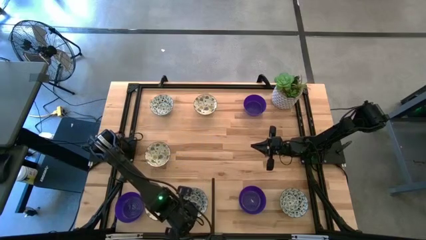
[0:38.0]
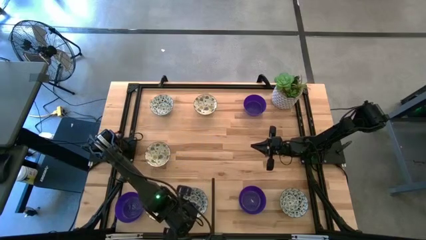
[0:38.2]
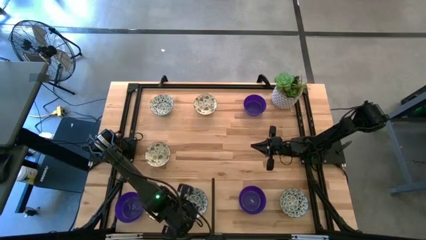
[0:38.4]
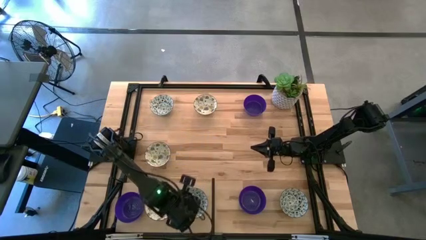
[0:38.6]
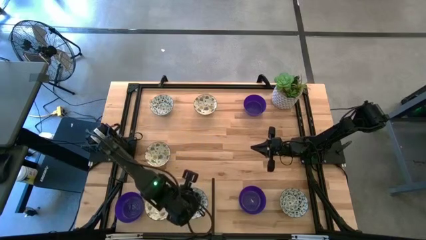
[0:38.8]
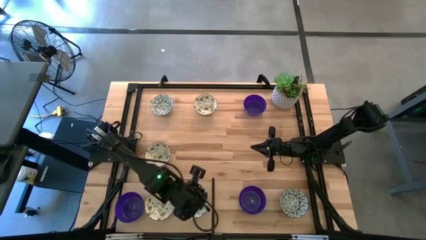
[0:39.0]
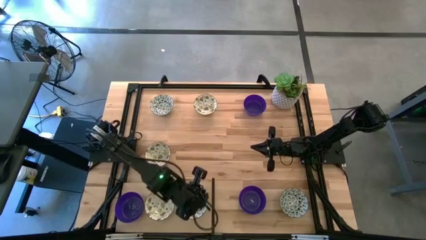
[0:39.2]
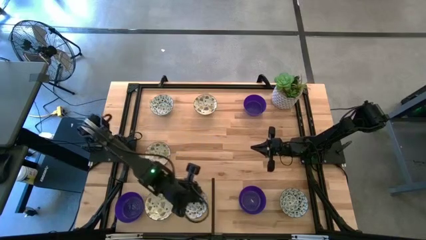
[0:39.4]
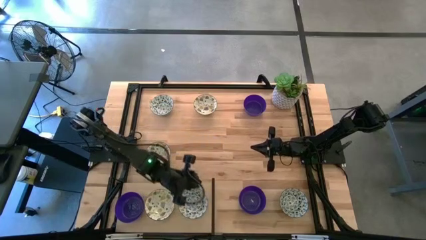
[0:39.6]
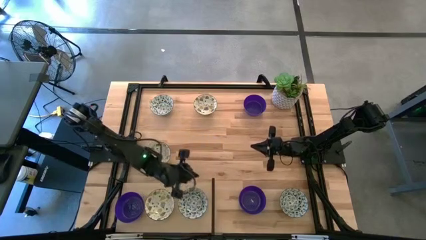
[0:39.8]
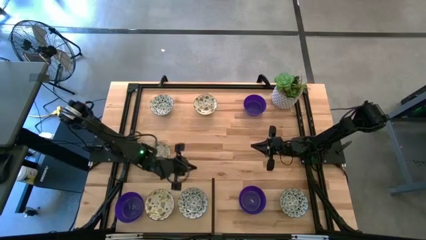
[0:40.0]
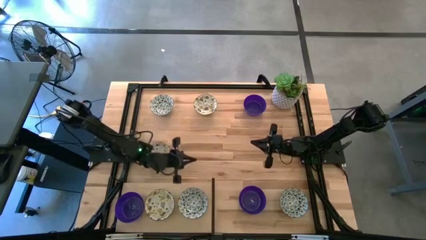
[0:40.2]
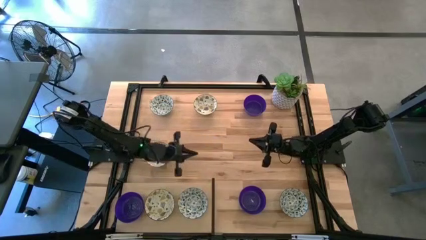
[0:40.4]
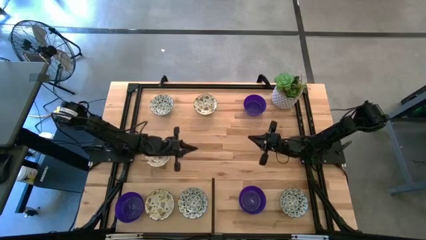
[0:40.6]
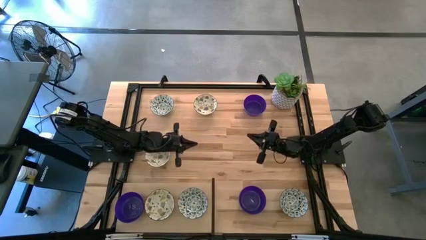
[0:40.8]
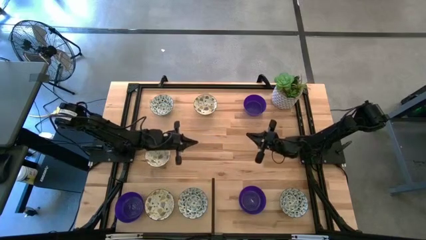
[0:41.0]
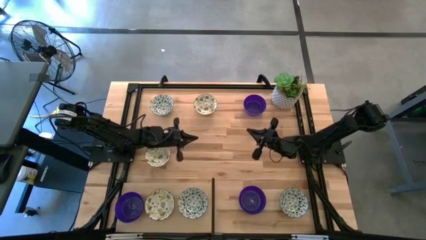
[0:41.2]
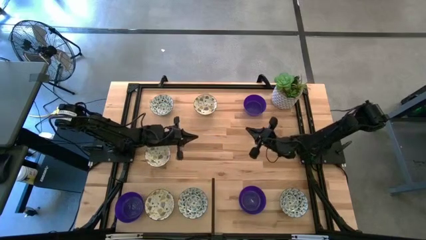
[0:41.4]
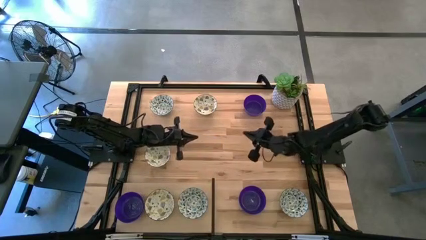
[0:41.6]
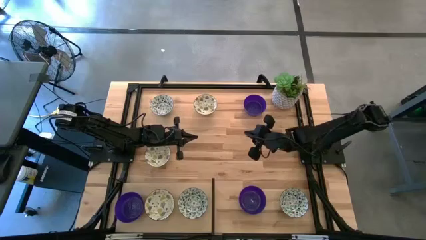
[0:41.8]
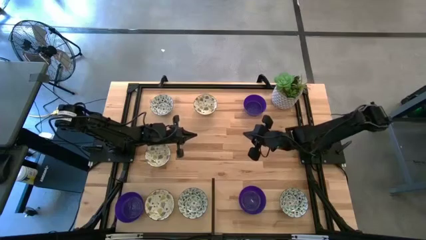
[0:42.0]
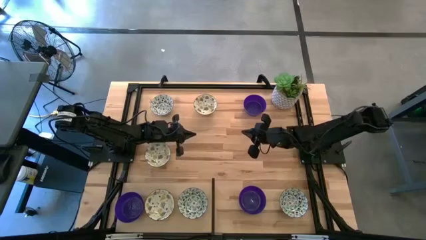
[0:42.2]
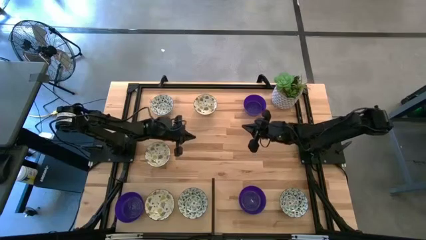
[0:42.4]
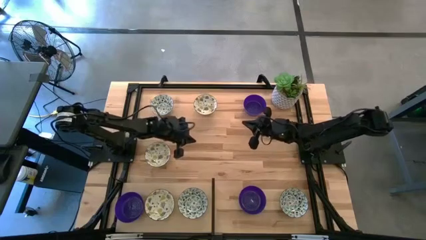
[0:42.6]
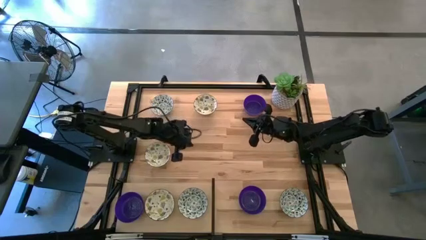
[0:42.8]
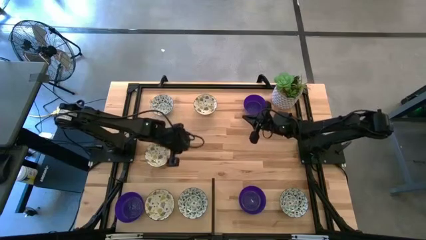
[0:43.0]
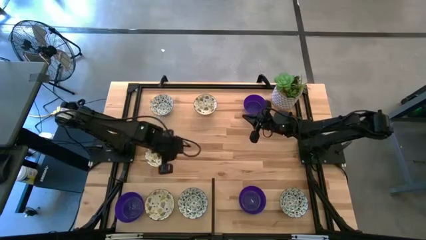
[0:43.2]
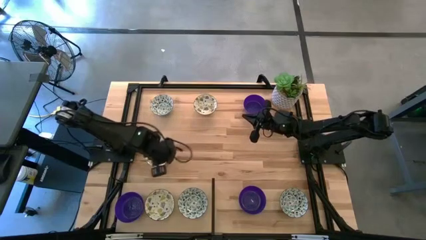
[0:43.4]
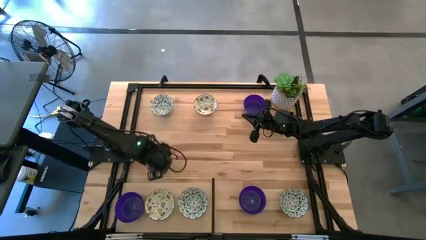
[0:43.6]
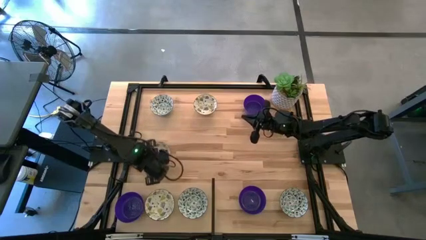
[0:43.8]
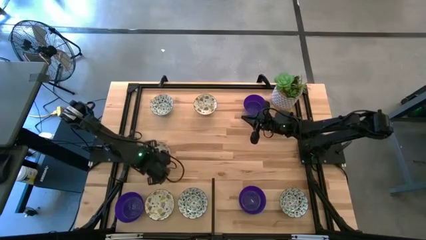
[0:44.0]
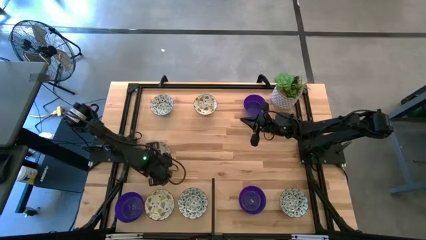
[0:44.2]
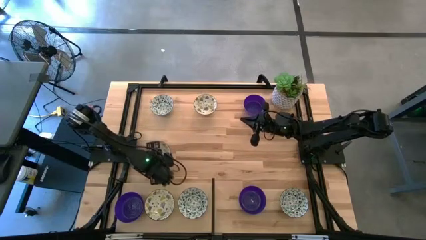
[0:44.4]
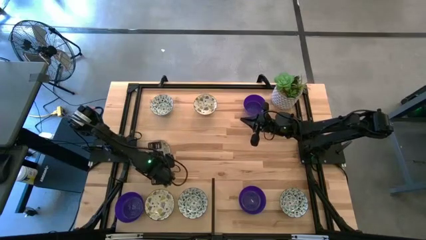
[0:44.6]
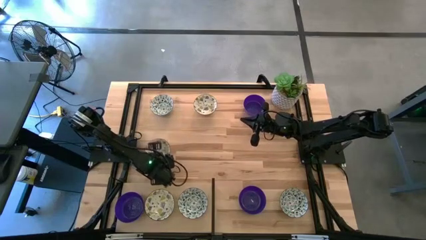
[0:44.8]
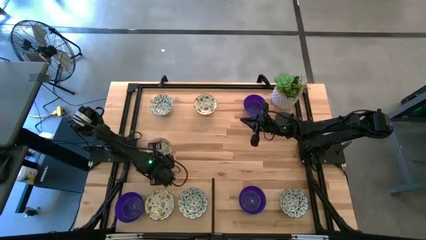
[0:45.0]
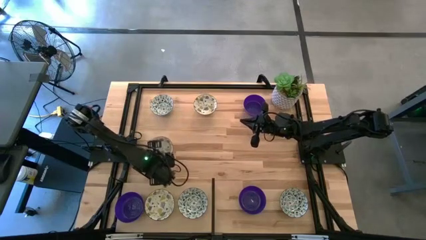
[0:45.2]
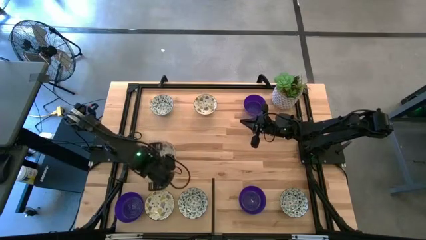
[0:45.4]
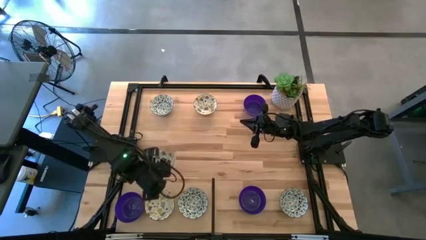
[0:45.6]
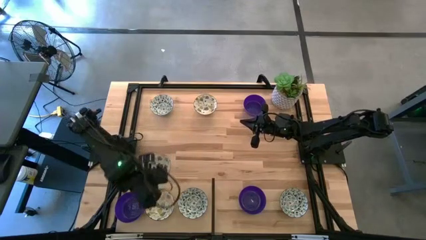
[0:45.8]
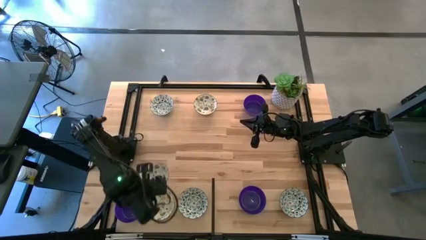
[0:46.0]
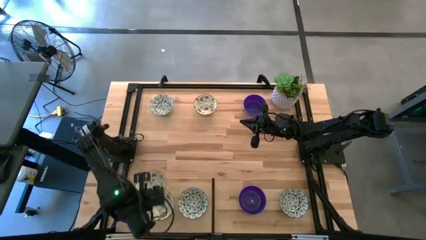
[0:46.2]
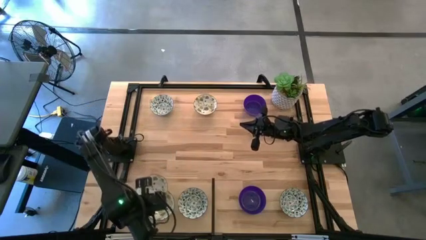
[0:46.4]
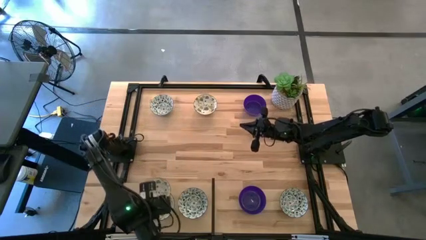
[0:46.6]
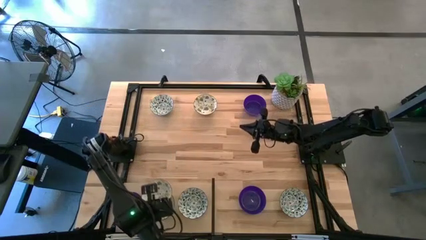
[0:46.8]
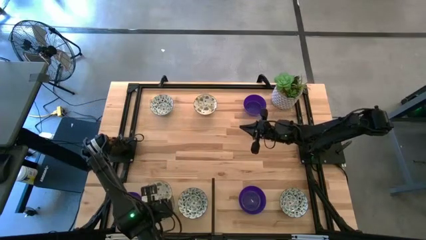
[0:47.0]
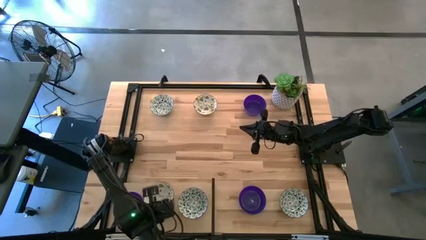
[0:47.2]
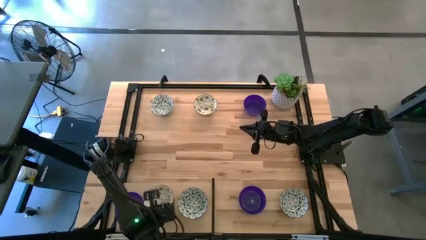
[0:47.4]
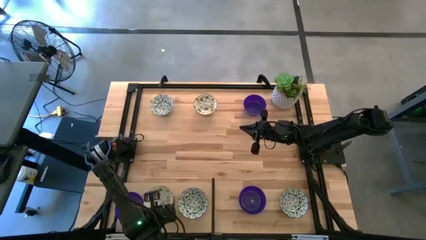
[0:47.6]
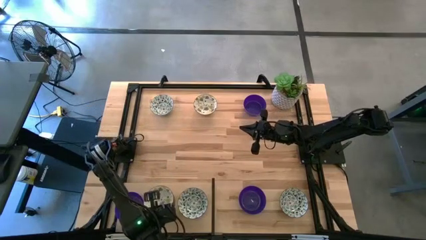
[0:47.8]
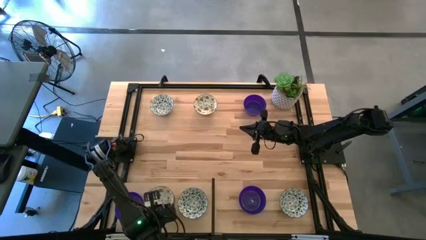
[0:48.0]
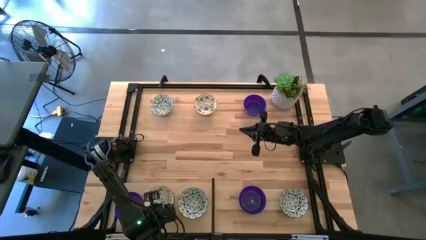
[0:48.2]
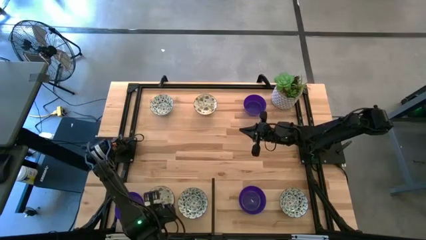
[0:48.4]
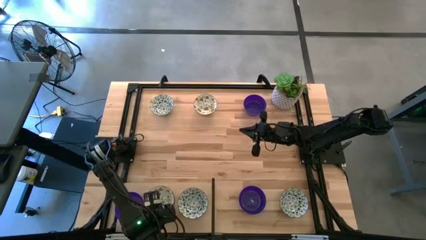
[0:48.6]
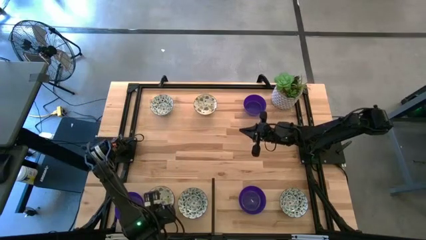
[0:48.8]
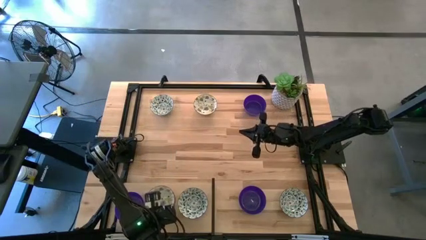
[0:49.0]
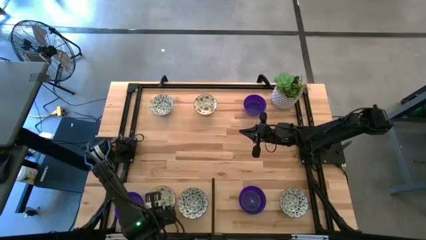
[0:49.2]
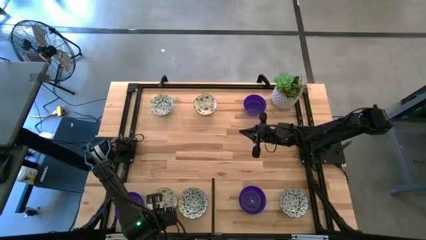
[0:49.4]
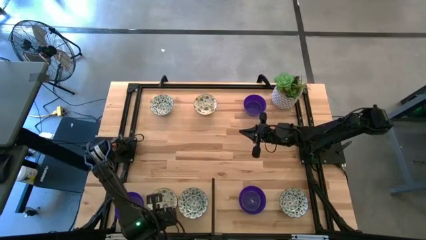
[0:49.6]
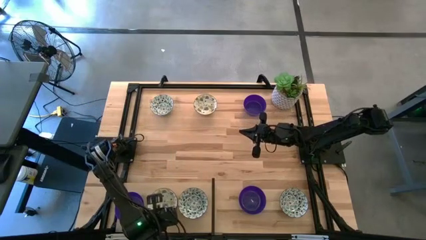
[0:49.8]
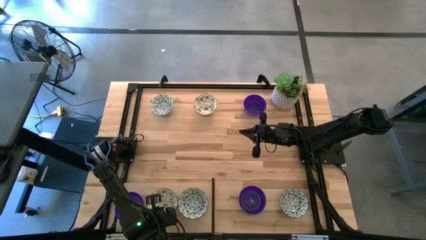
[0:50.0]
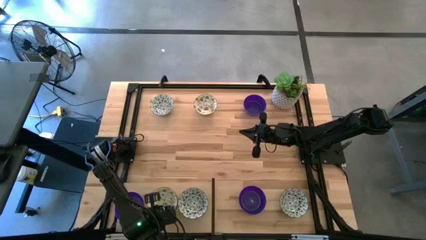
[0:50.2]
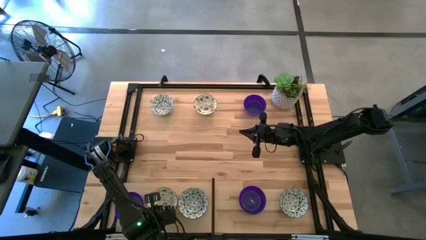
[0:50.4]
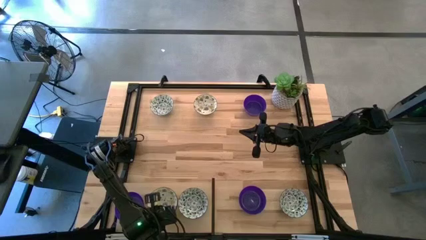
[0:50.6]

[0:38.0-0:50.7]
Task: Pick & Place Mini bowls
Stack the bottom yellow patterned bowl on top of the other yellow patterned bowl on the shelf

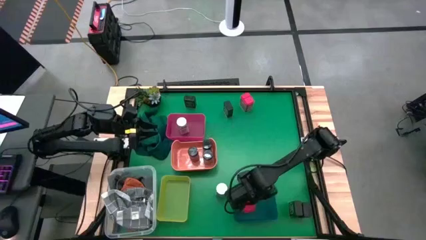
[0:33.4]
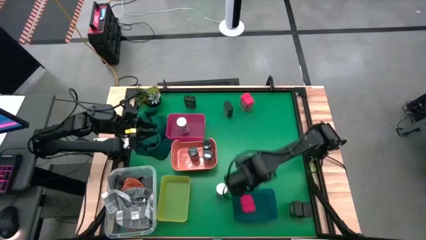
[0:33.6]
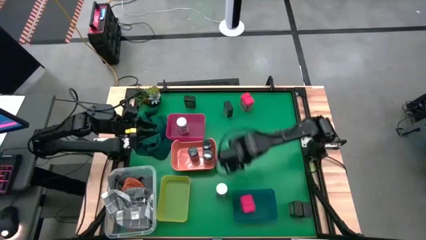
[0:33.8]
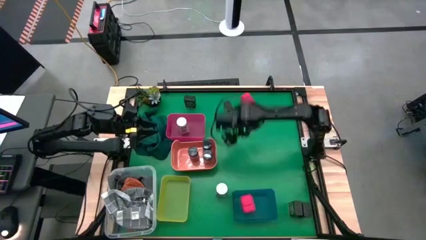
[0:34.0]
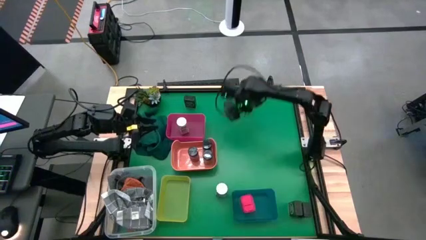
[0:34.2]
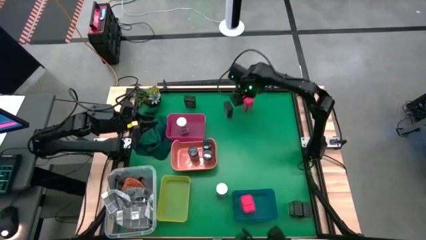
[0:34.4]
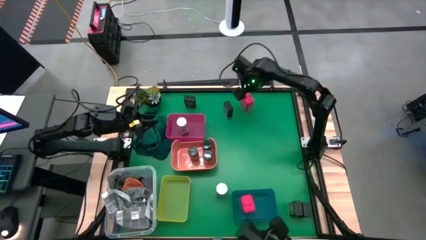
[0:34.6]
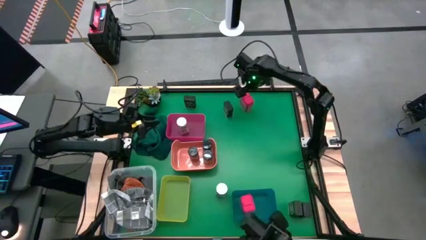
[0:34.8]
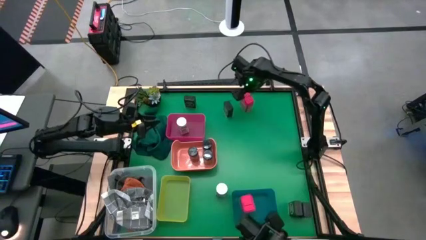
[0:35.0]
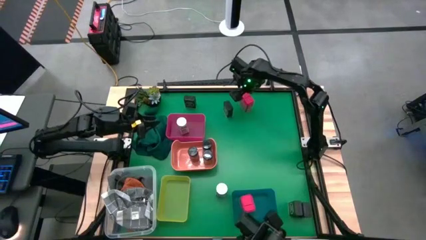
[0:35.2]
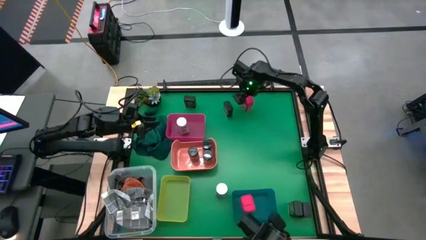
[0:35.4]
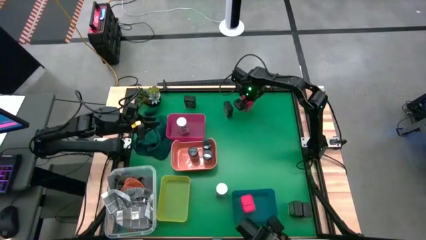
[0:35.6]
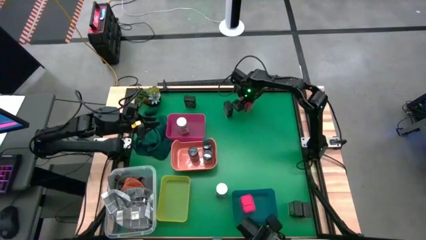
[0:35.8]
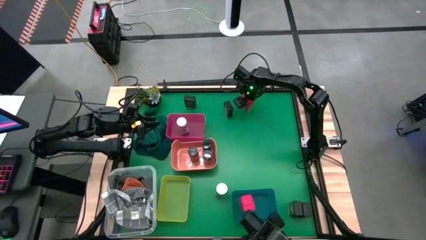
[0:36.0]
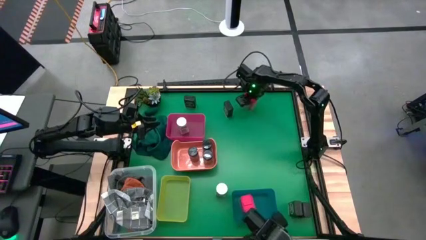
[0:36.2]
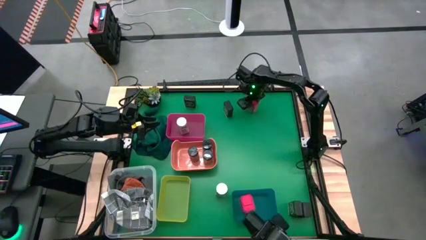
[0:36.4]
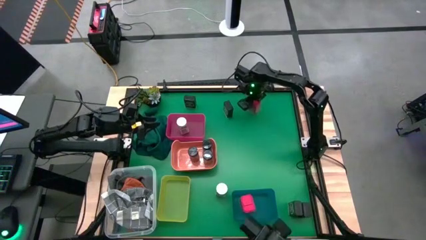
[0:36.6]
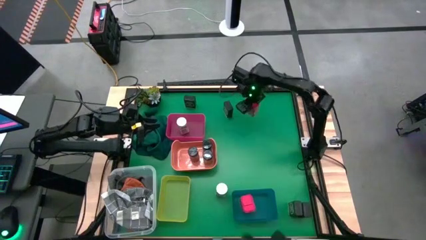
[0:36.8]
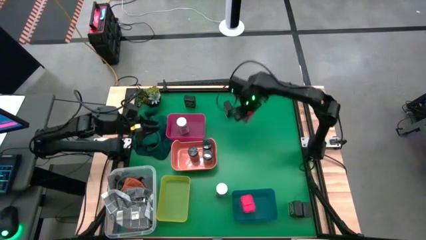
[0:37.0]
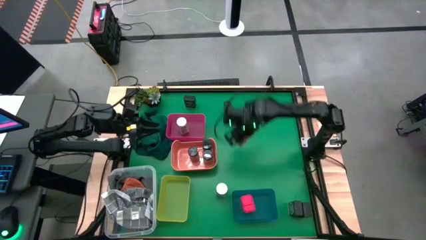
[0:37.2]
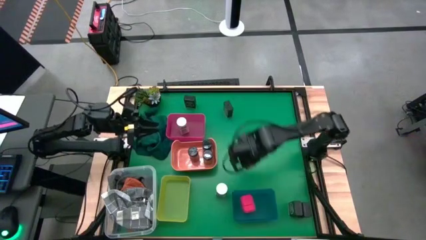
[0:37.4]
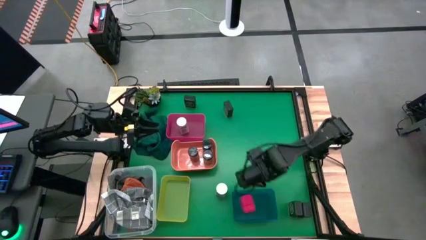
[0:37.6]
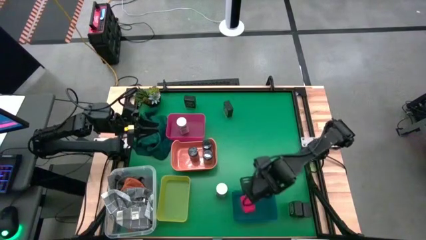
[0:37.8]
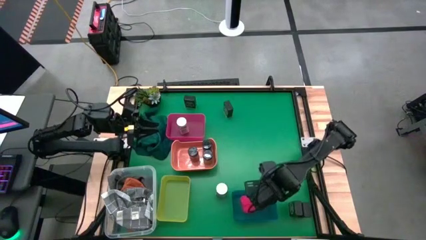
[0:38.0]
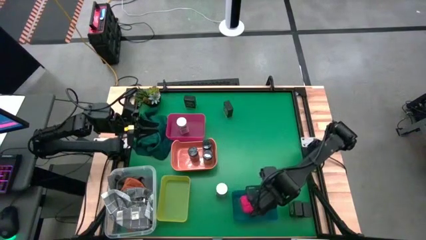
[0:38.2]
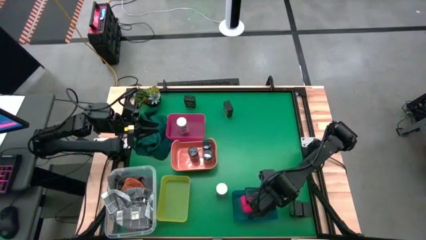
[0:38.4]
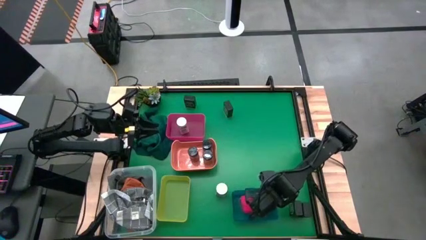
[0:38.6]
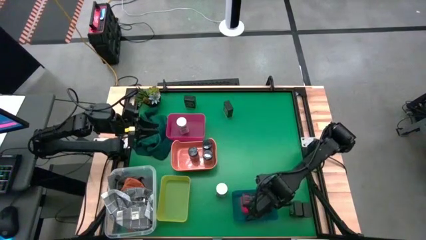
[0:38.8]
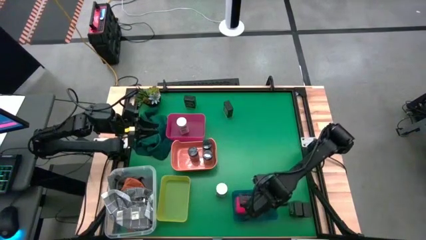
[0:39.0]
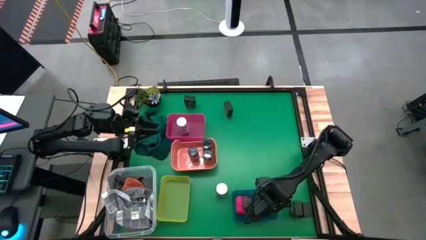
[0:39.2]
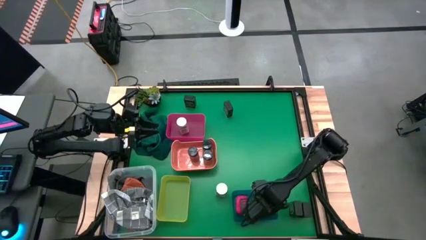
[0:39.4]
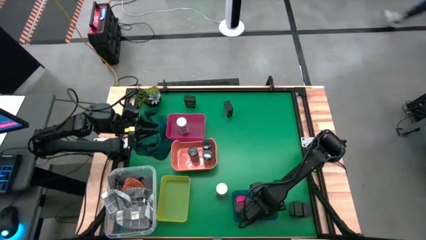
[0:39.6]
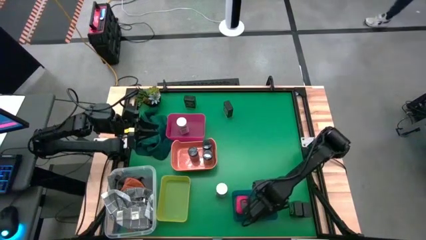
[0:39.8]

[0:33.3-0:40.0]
Task: Sort spices by type
Put the red seasoning can into the blue bin
